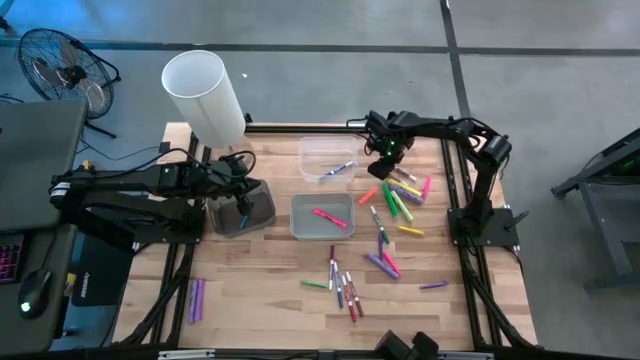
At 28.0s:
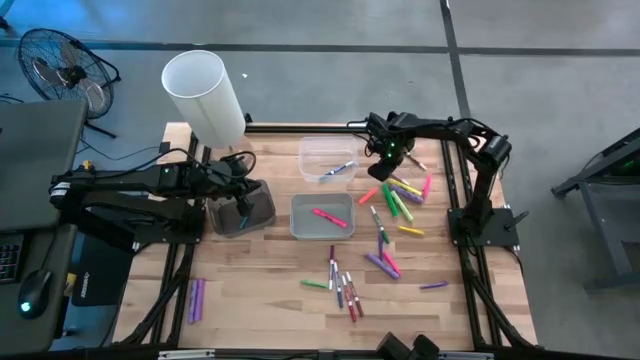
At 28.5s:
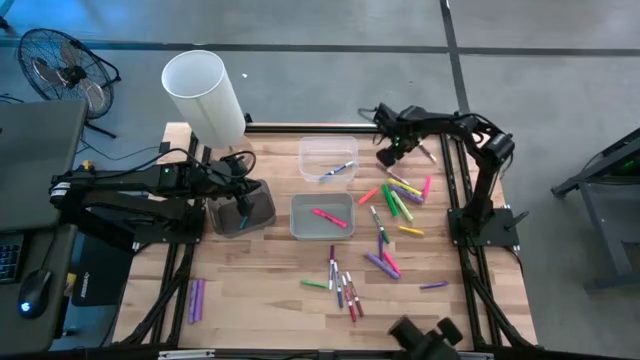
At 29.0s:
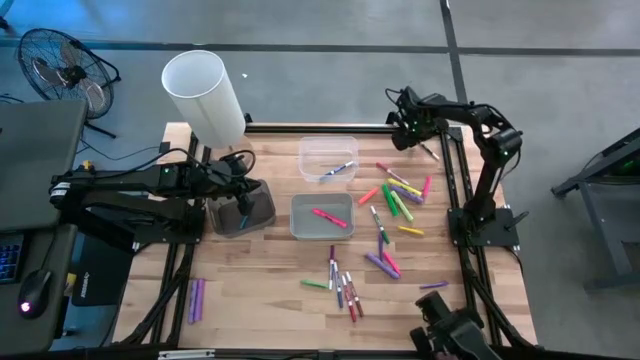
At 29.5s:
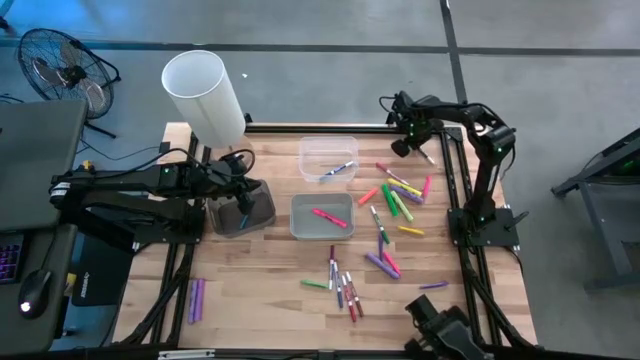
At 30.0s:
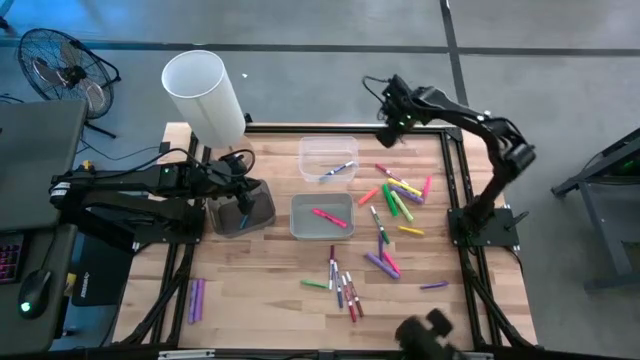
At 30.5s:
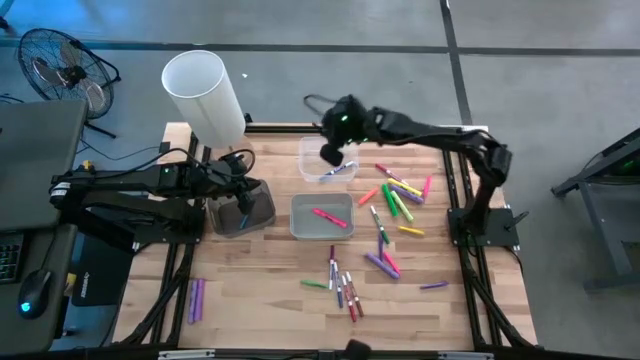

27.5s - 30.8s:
Task: Pick & Place Markers
Put the black marker pen into the transparent bin

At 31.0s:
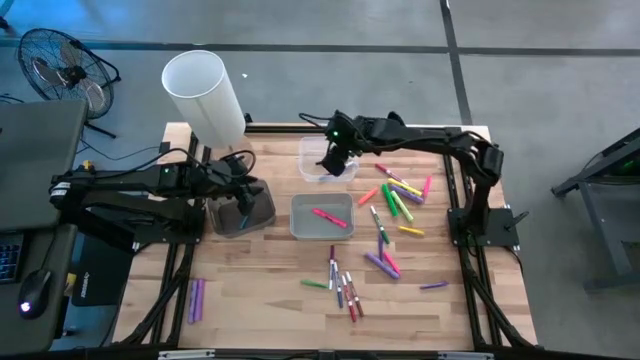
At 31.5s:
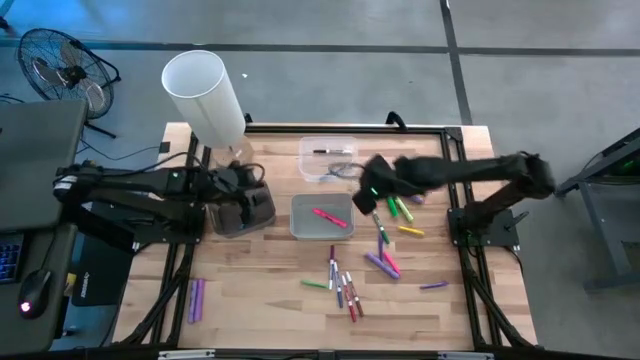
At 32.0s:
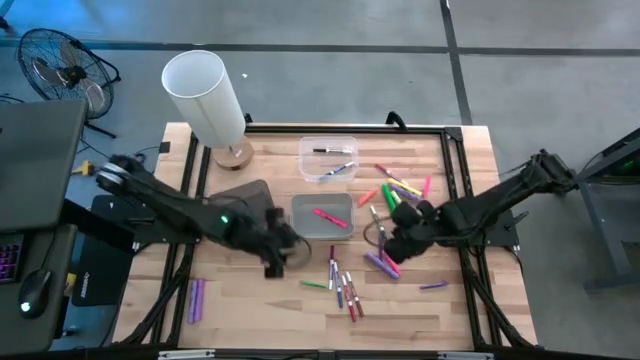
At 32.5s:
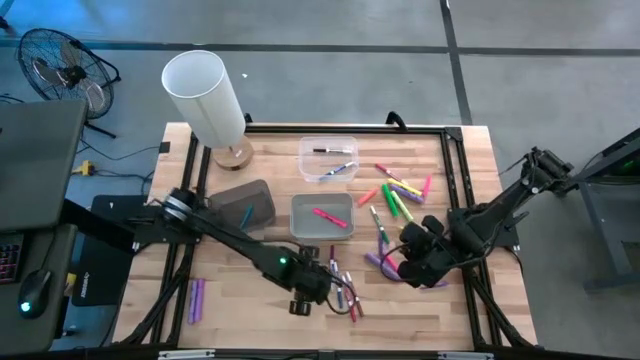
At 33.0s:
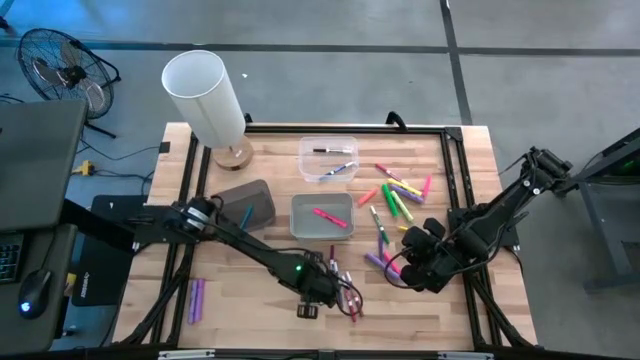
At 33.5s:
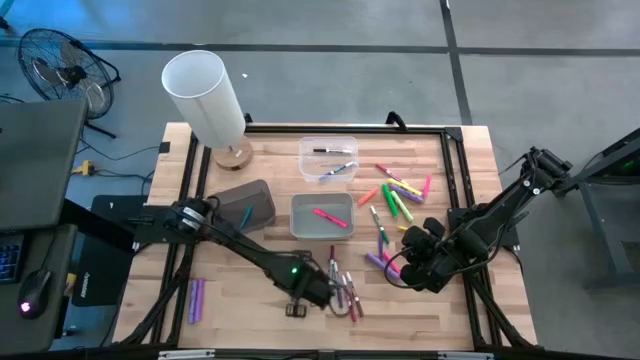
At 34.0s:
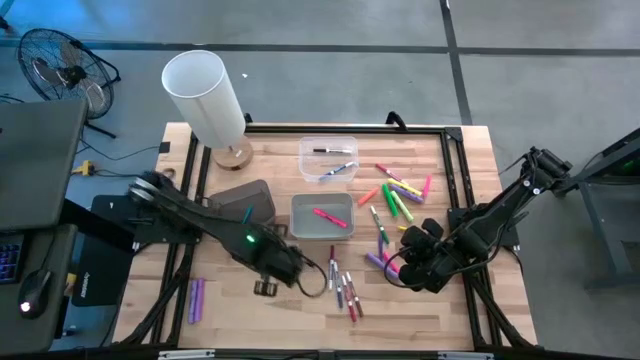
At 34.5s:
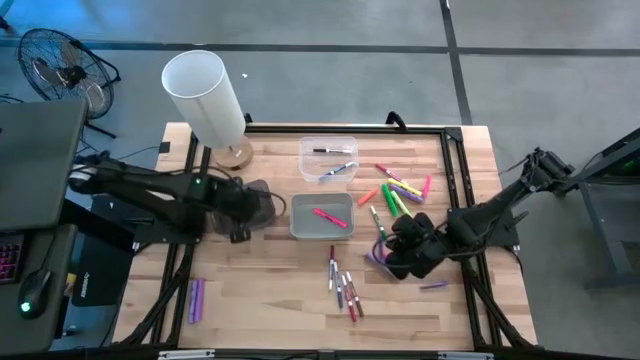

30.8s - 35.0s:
Put the green pen into the black bin

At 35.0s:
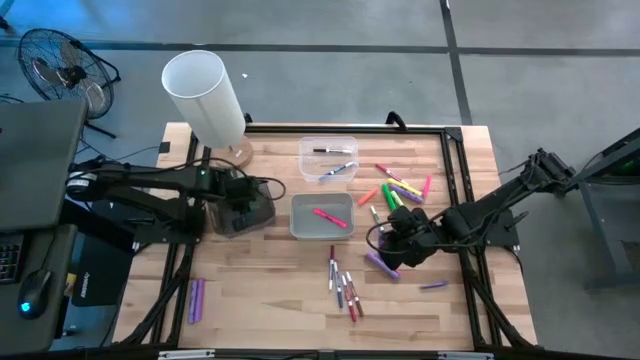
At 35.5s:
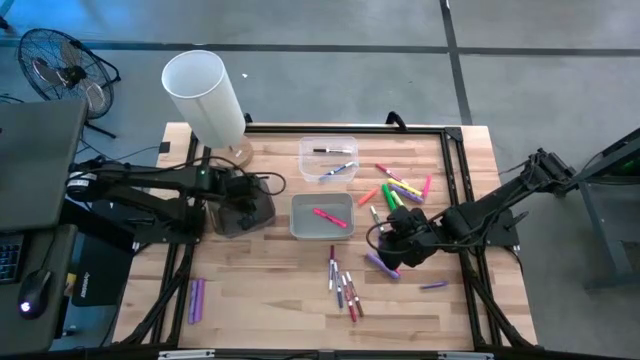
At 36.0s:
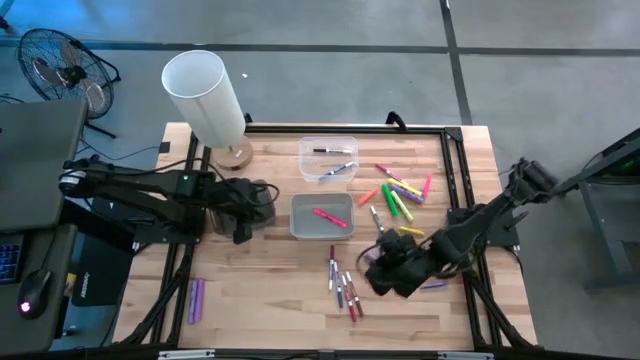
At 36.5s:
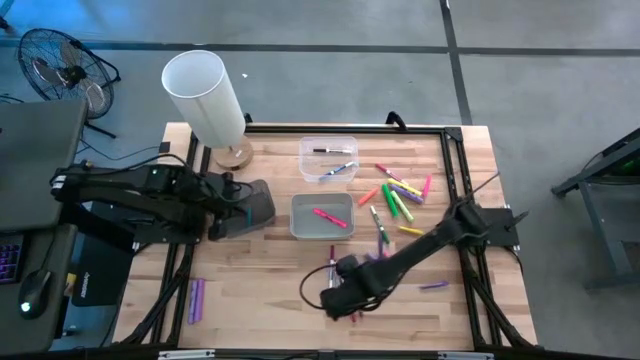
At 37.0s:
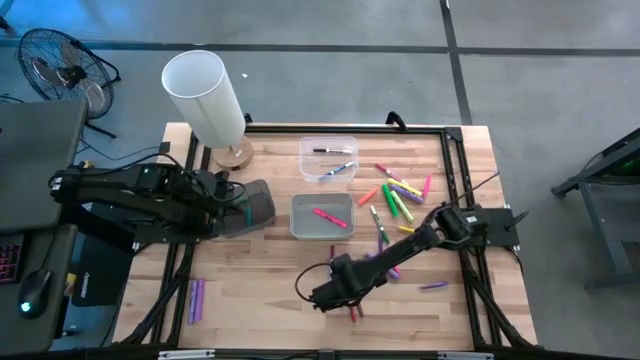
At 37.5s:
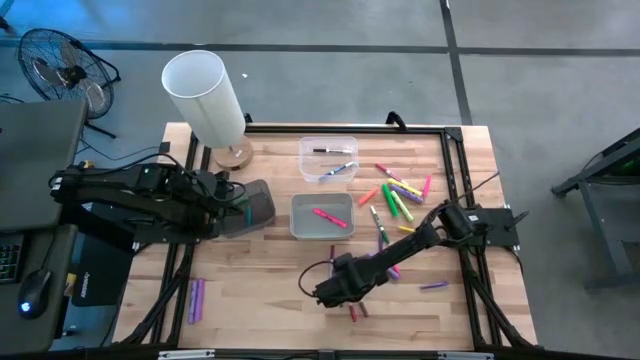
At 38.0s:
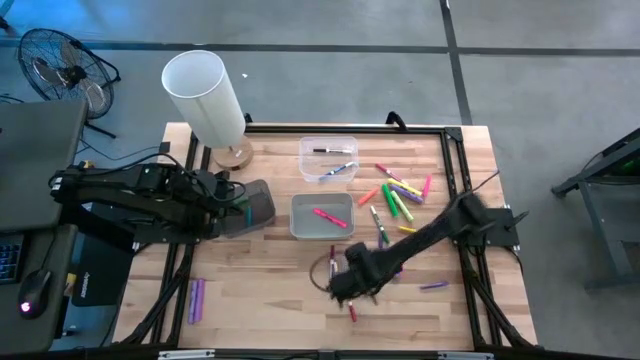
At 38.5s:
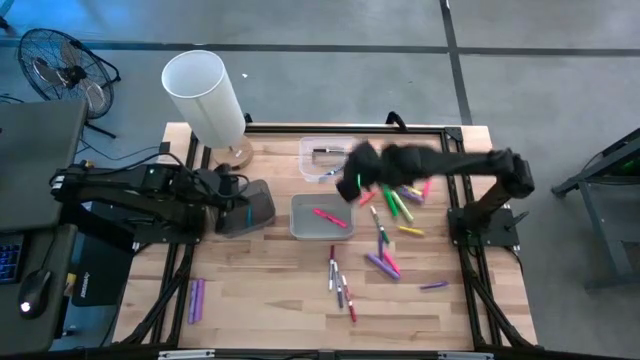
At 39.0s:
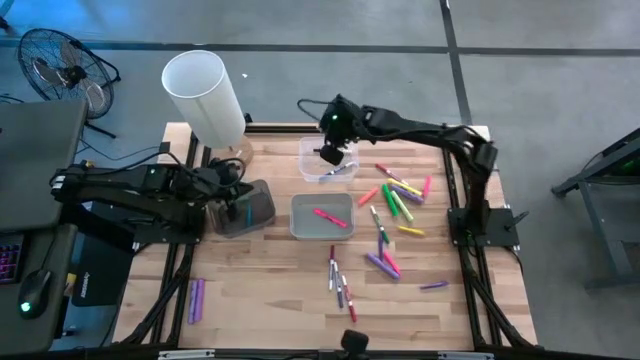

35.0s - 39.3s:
Put the brown marker pen into the transparent bin

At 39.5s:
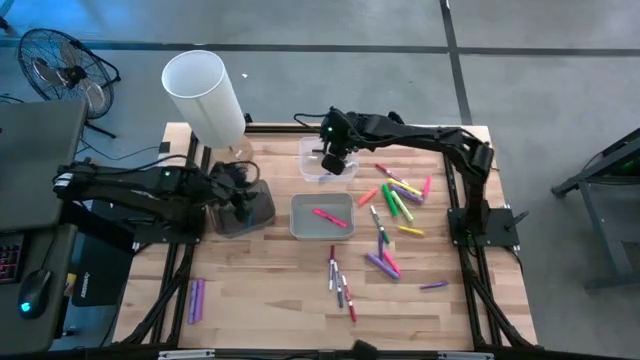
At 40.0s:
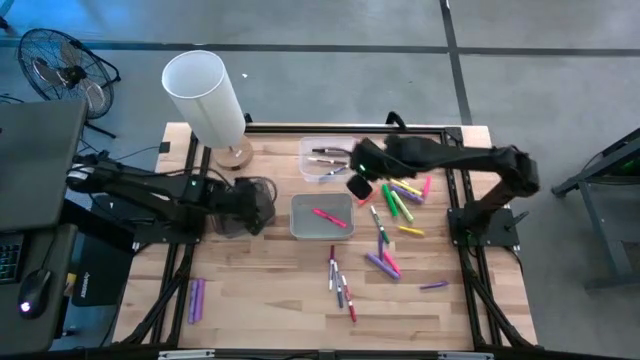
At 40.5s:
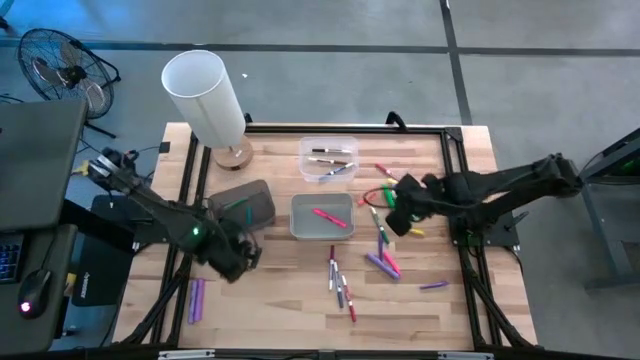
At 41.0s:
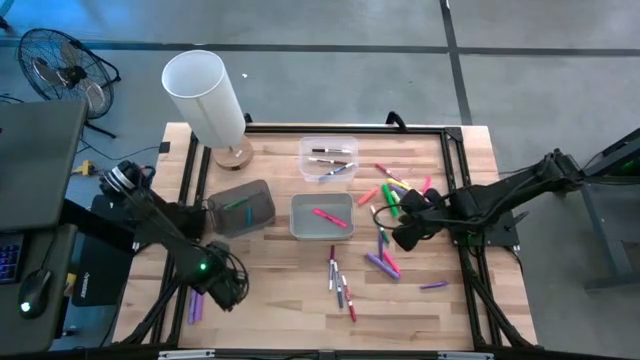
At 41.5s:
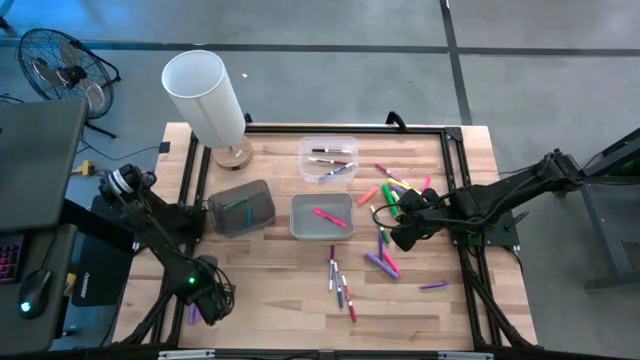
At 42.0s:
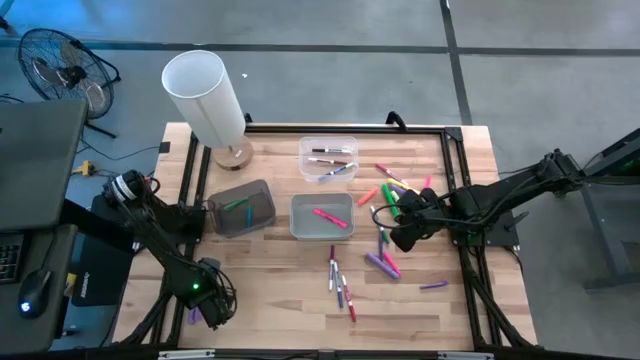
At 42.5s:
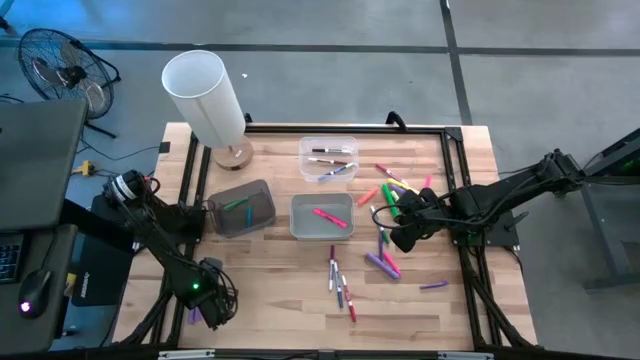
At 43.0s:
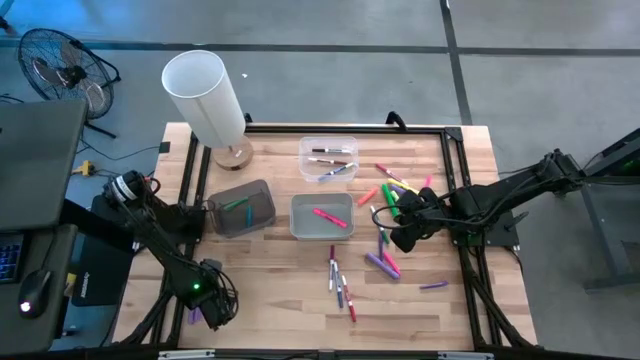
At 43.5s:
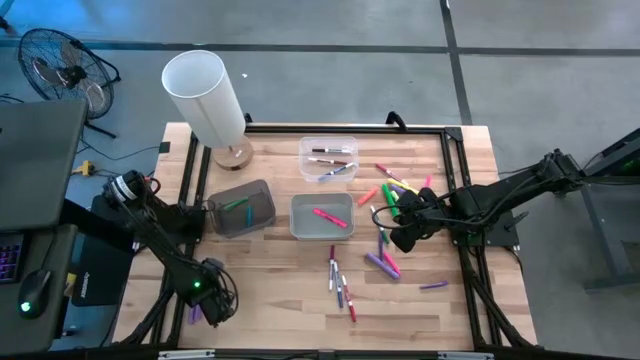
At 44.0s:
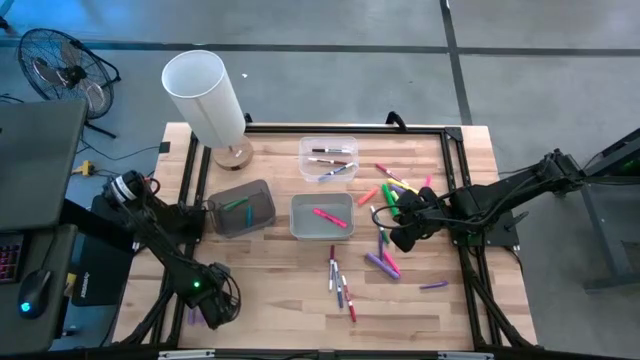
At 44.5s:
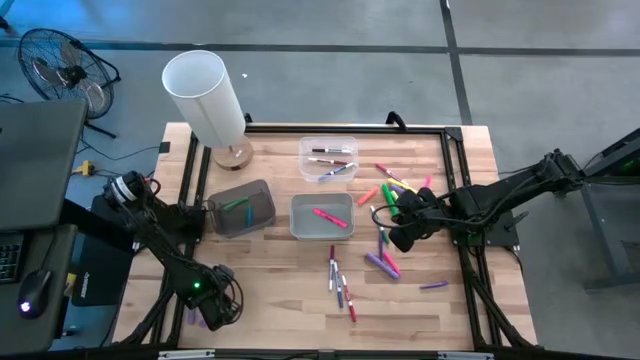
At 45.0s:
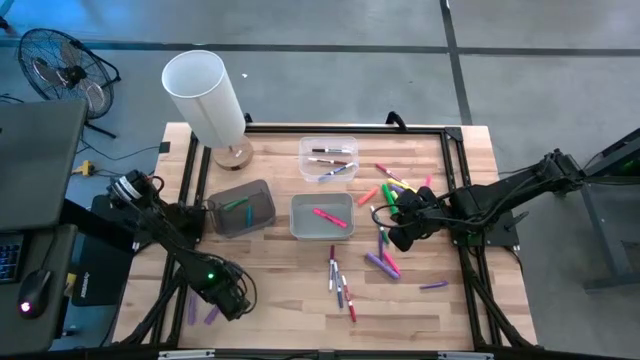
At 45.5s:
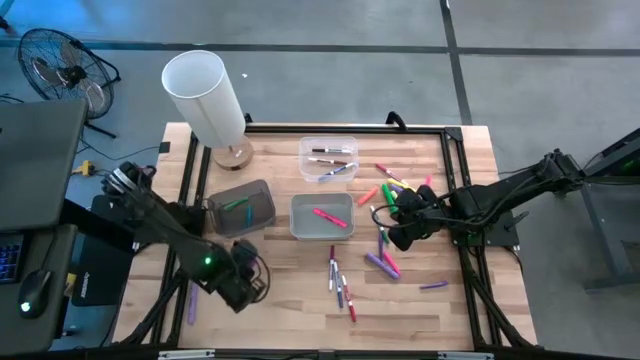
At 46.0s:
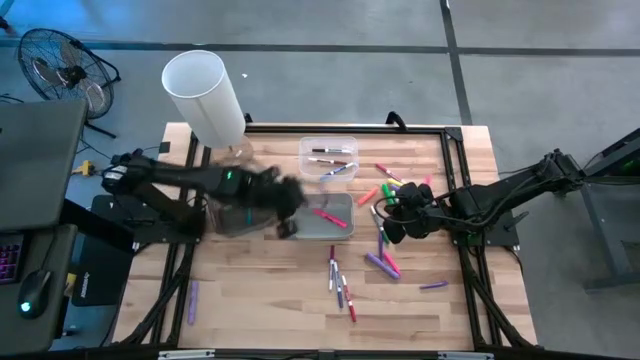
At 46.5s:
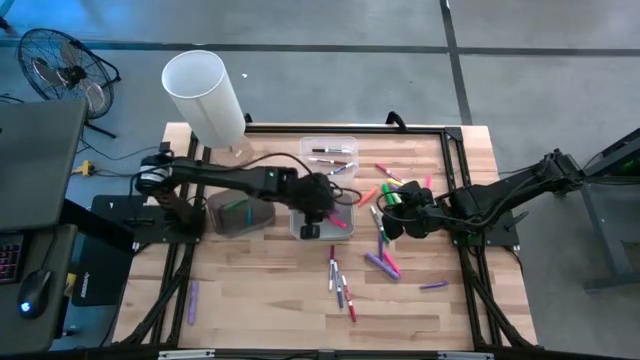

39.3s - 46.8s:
Put the left purple highlighter pen into the gray bin

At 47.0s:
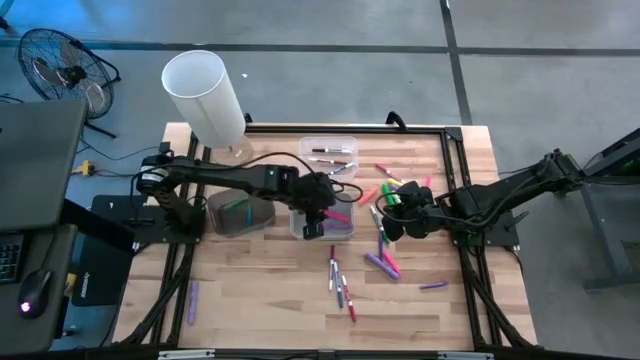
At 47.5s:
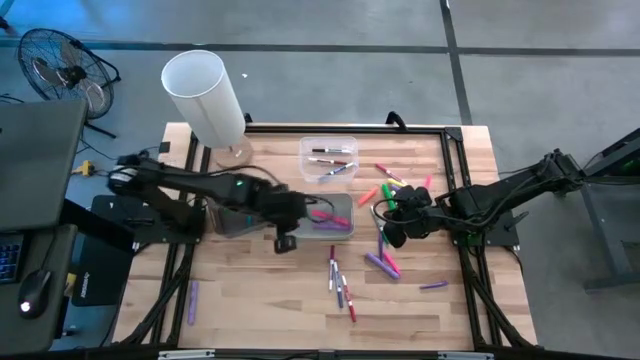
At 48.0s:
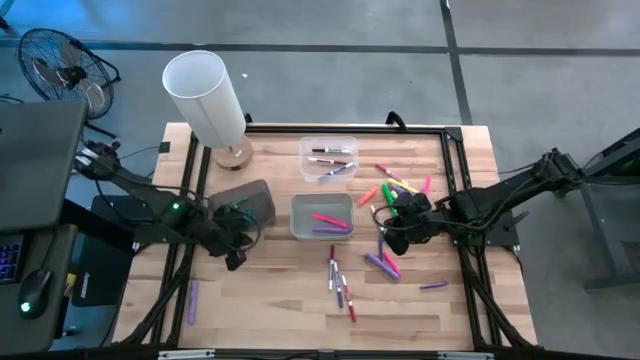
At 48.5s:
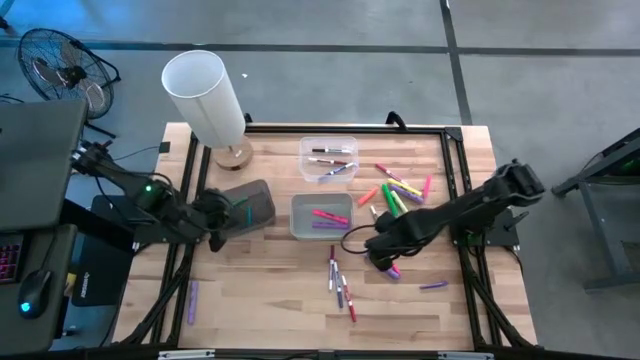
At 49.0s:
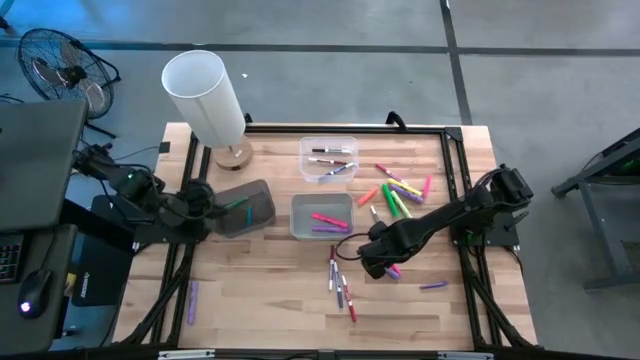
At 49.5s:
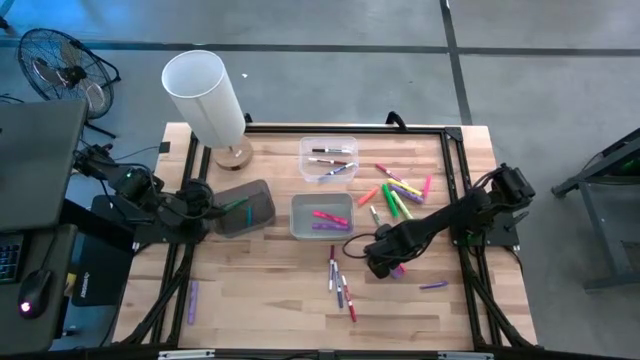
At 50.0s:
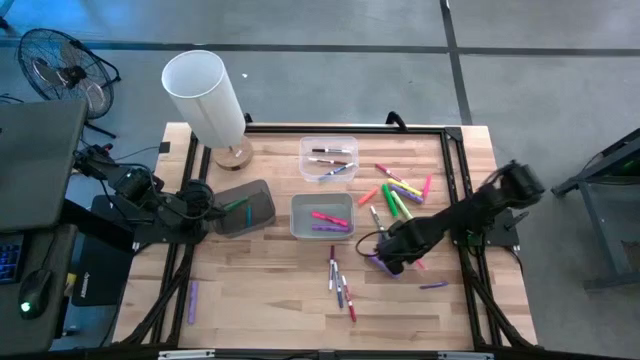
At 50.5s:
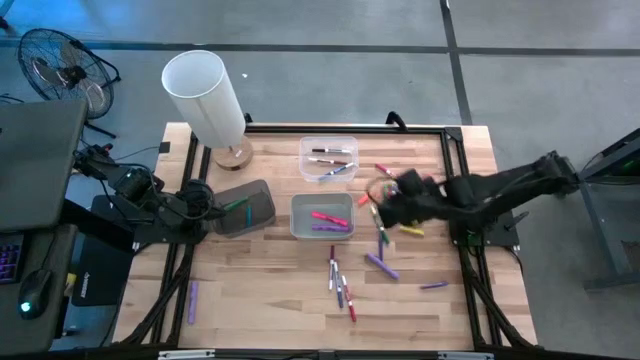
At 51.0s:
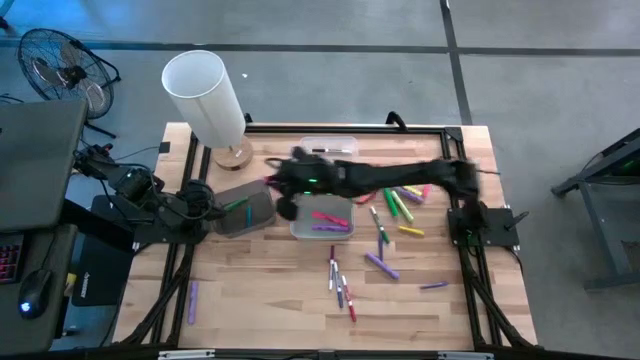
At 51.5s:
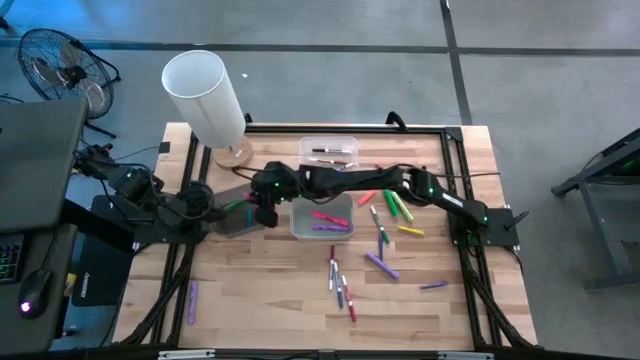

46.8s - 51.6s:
Put the bottom pink pen into the black bin
